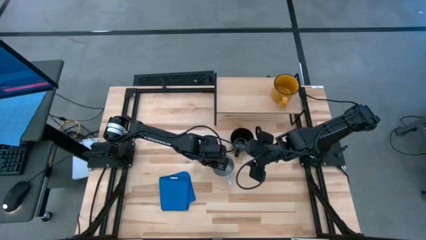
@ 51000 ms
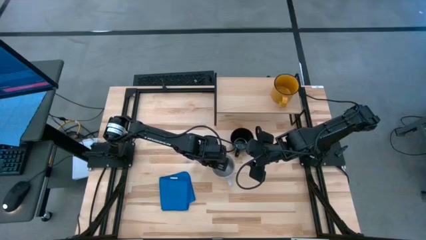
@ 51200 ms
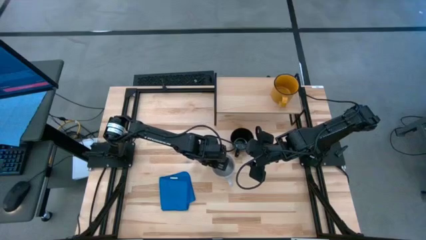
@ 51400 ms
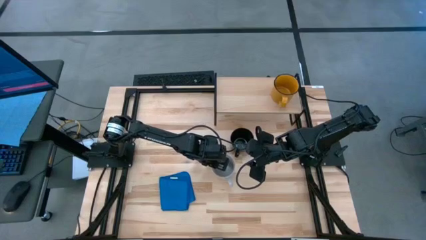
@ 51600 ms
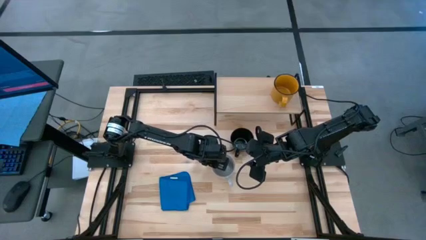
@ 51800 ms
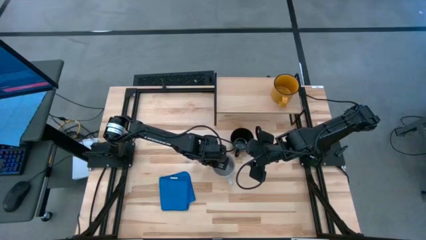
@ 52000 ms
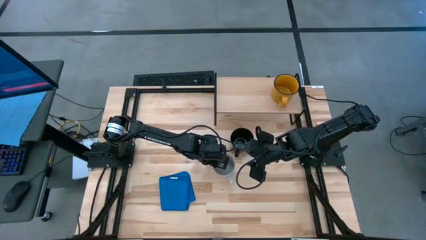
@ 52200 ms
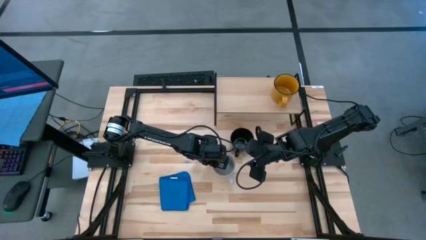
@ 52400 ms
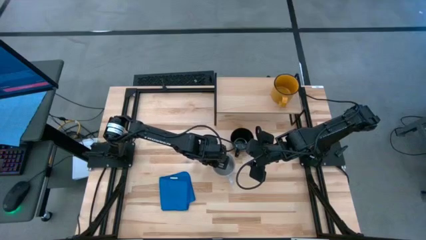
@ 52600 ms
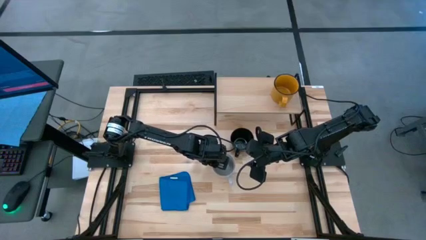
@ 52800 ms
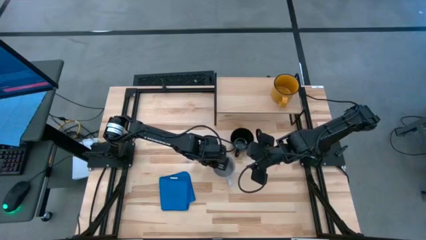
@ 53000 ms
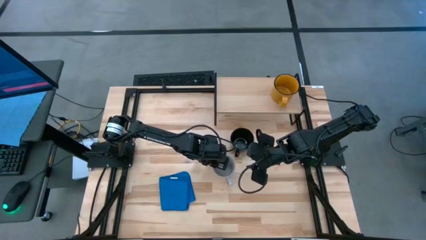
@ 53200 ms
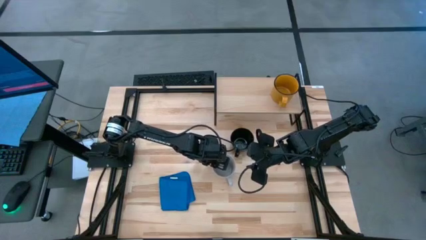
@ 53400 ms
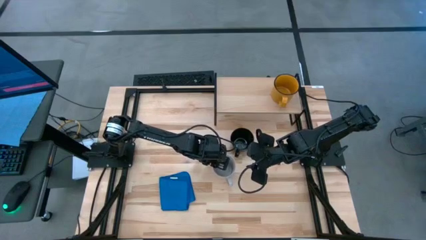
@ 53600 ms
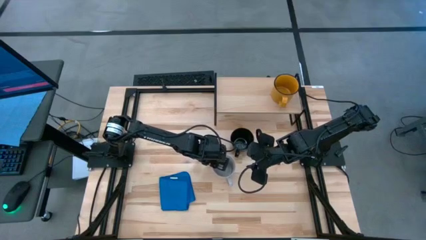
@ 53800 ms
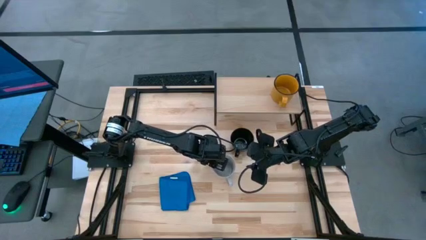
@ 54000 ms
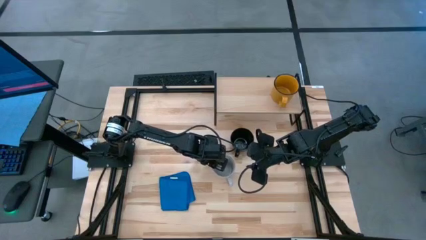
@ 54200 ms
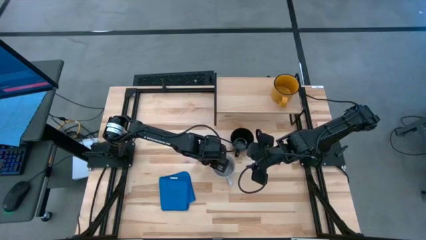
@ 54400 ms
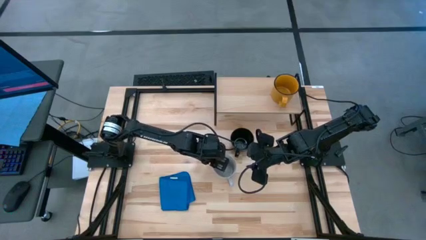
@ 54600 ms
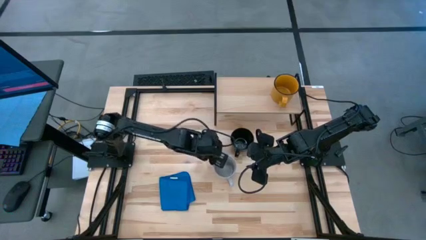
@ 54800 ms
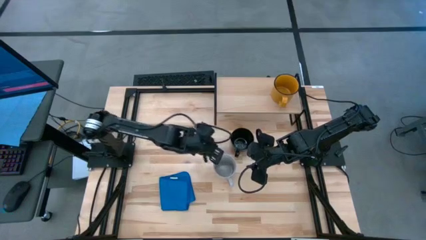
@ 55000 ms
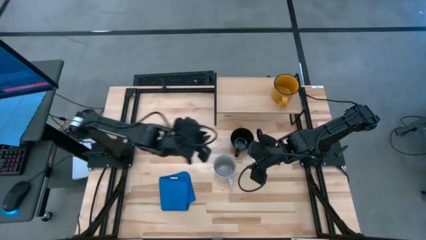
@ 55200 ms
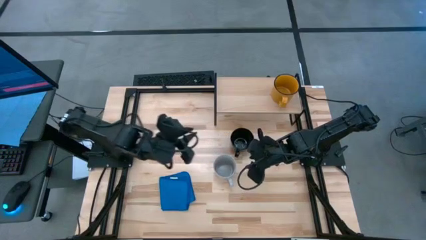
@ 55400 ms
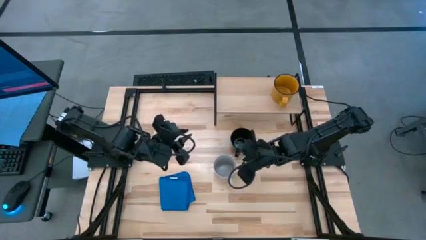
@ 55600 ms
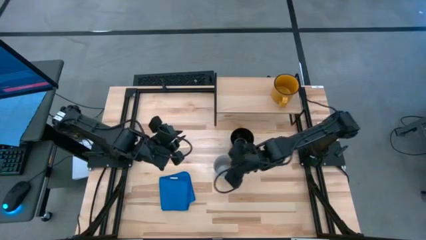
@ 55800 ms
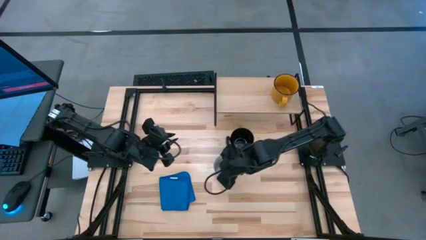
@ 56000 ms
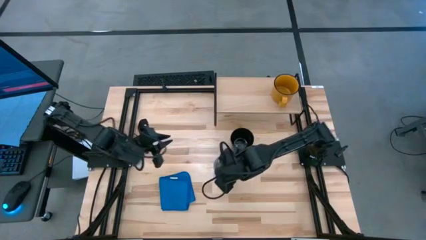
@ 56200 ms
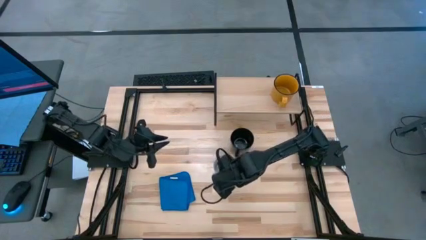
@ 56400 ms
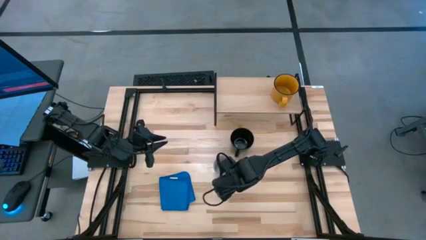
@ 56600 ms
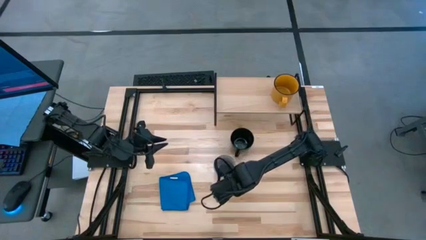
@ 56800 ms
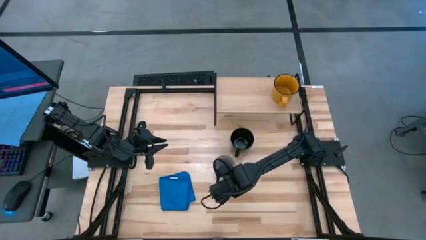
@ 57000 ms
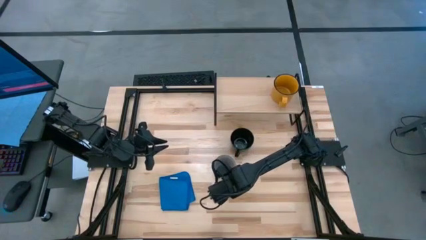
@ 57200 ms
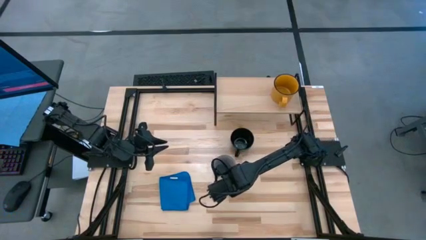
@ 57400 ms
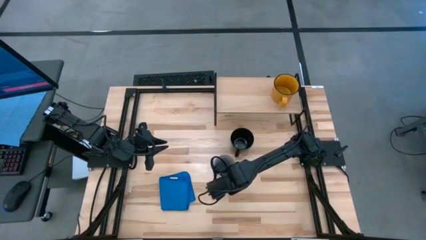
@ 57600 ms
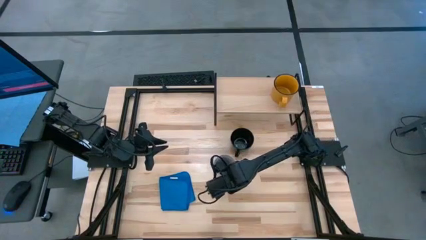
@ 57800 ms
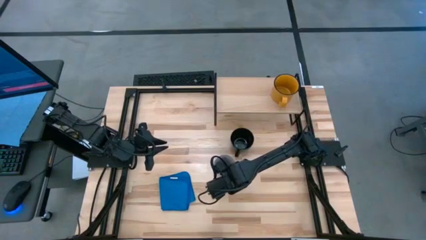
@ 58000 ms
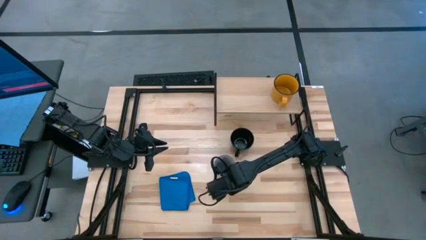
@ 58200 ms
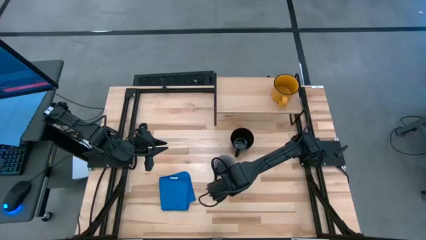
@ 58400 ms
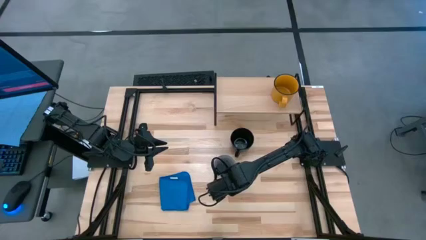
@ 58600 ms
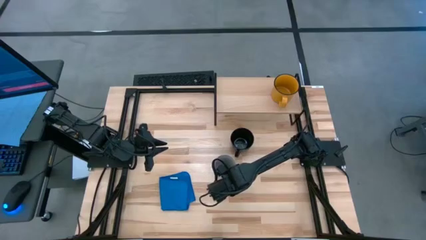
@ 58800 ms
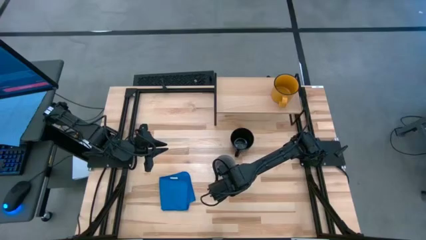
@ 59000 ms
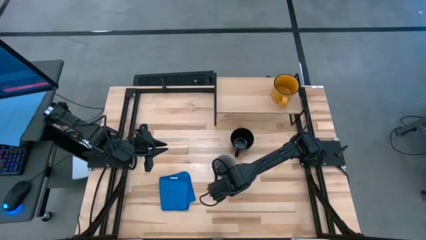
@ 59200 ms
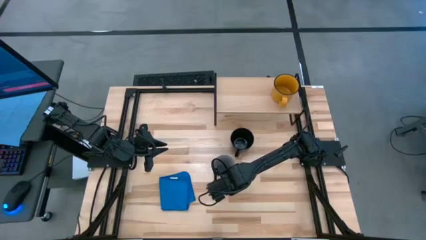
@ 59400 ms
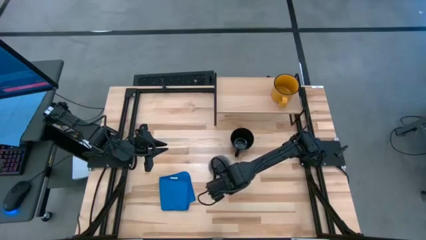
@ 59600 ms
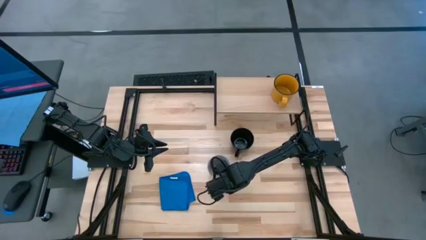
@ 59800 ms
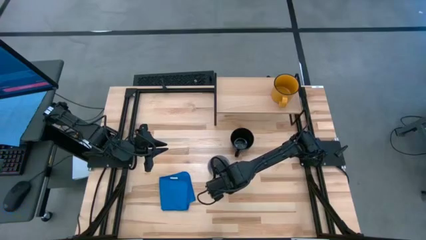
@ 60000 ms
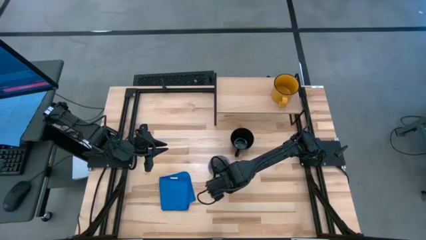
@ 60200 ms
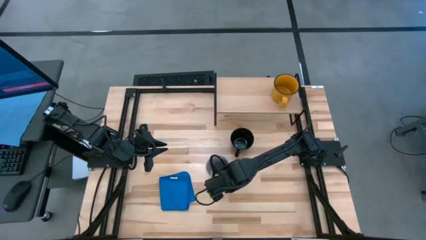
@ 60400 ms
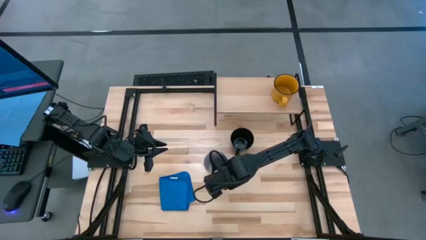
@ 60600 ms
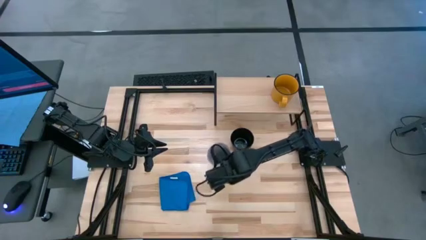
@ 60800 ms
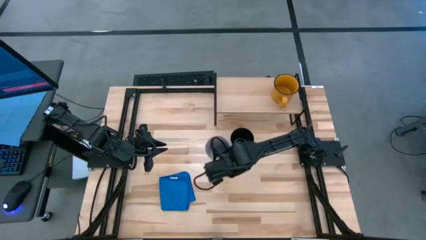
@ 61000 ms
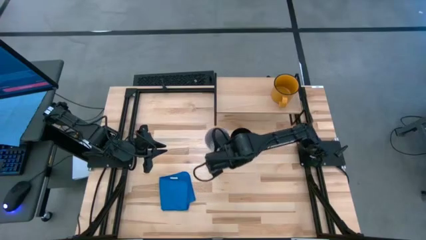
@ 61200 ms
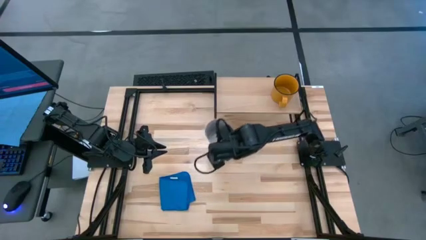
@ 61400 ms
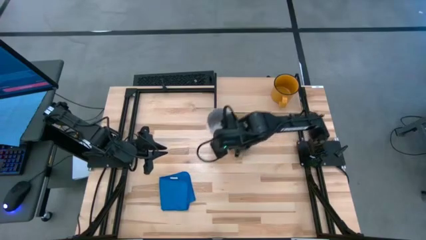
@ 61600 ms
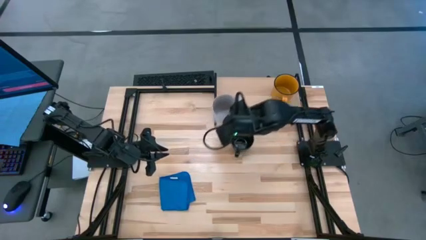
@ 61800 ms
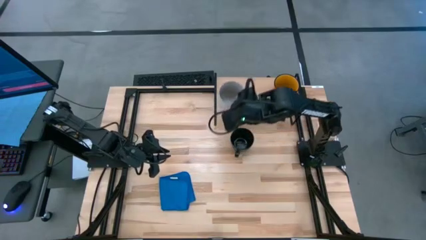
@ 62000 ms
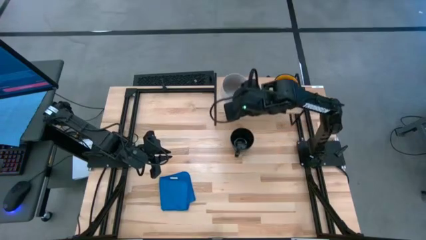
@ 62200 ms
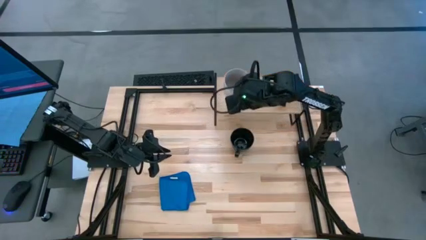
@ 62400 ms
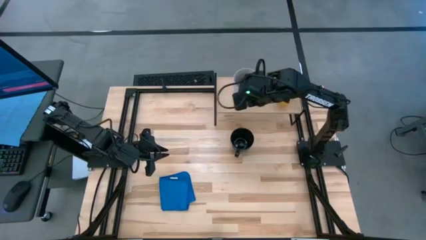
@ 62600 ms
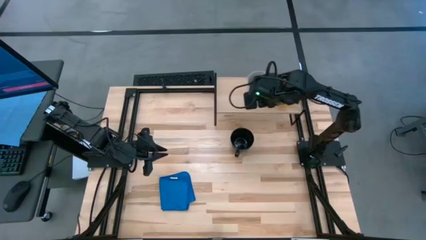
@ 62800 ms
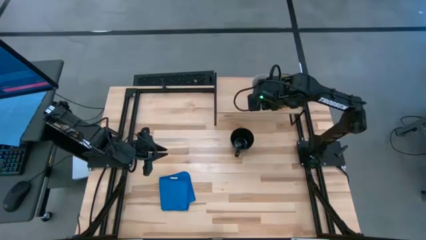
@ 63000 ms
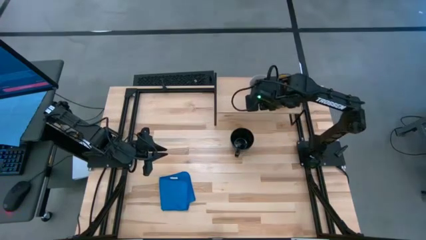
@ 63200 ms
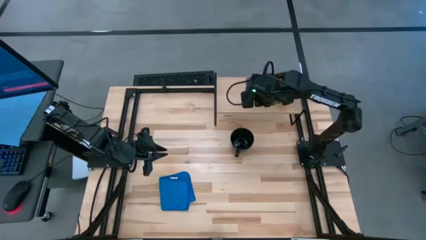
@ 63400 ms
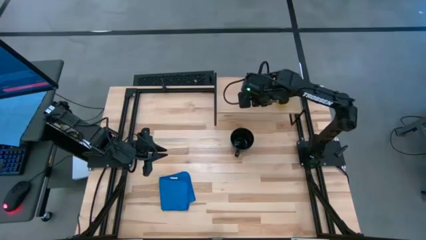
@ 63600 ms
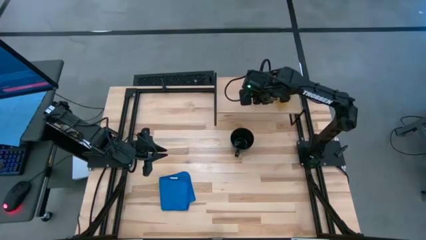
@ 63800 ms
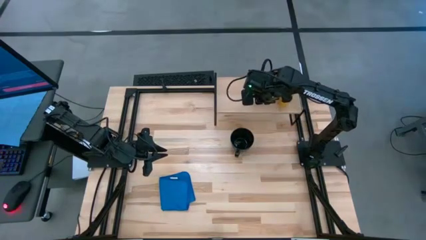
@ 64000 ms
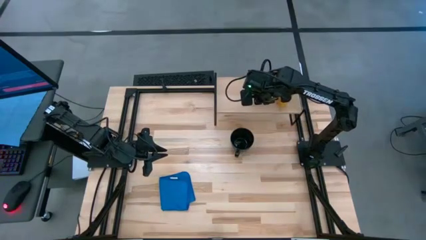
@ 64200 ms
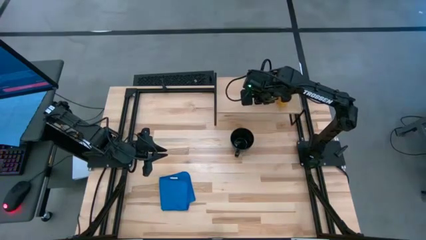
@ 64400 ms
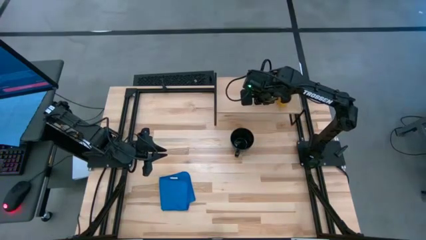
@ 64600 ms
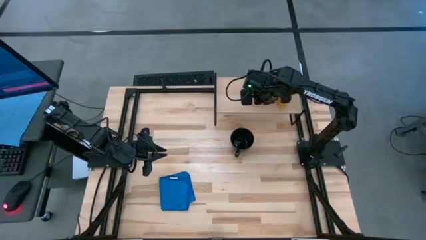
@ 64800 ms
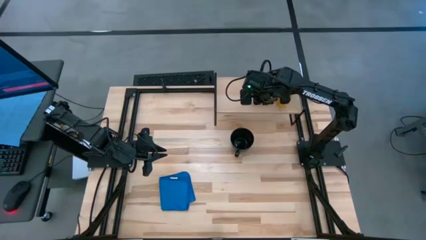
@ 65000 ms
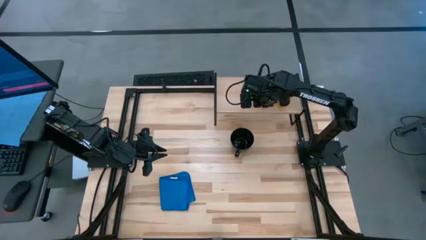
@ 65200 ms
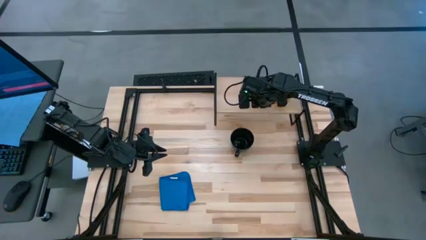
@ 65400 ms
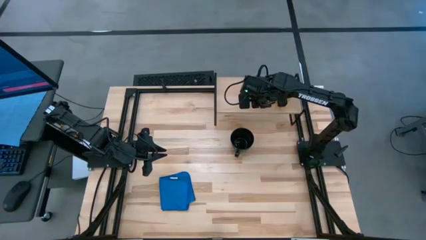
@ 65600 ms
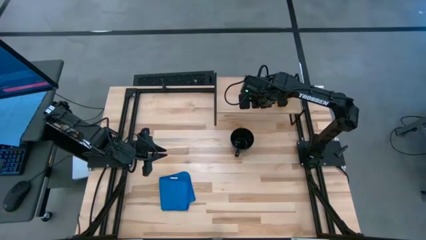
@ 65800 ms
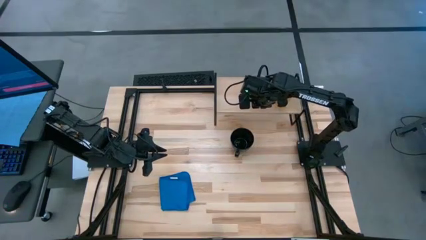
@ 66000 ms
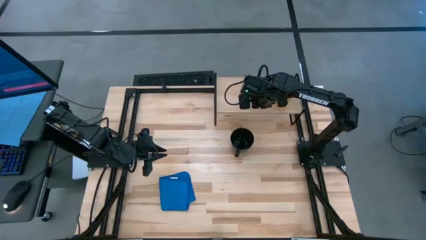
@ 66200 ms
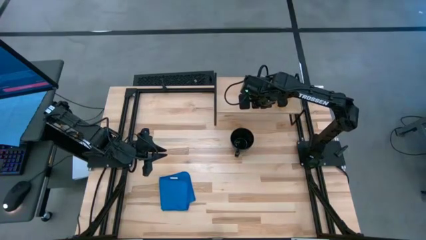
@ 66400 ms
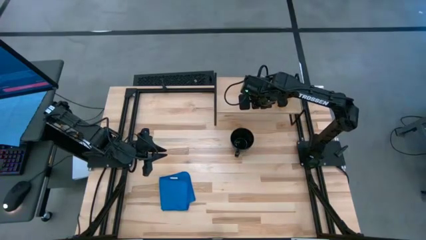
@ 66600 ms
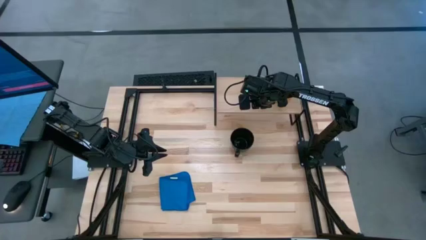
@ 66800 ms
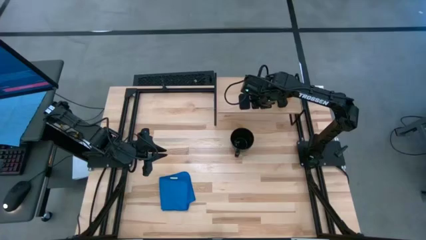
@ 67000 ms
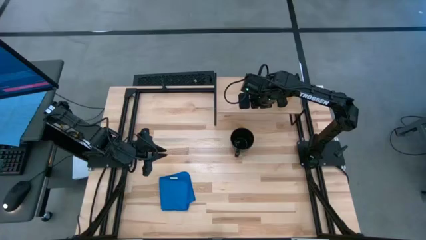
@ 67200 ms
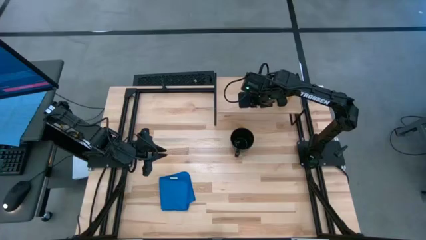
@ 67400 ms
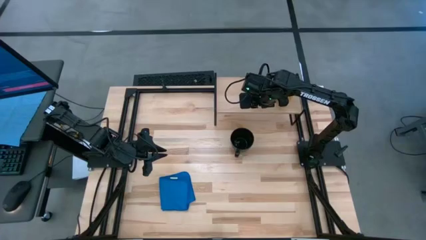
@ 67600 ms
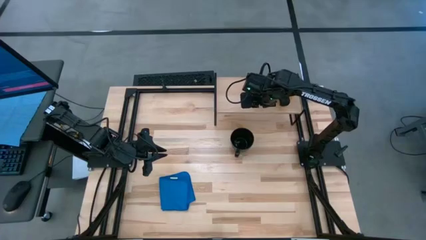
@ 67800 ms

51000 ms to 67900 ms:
Task: Stack small to large cups/mugs on shelf
Put the gray mug on the shelf
